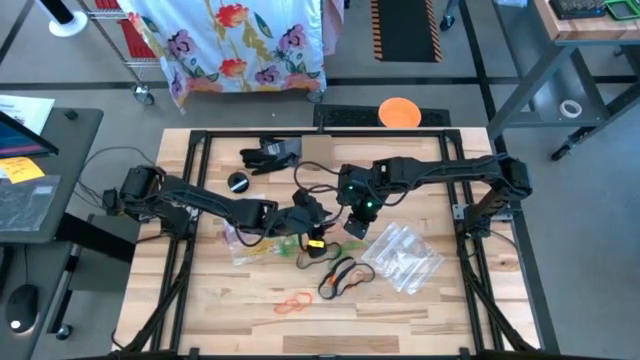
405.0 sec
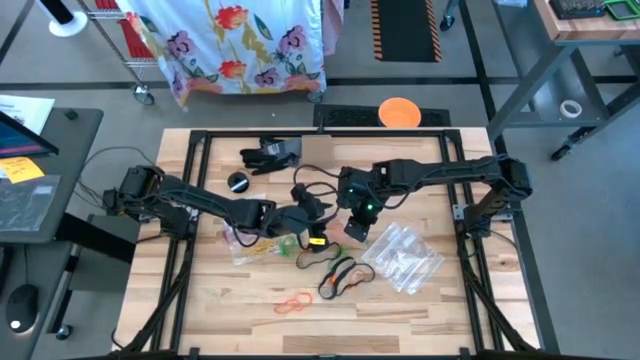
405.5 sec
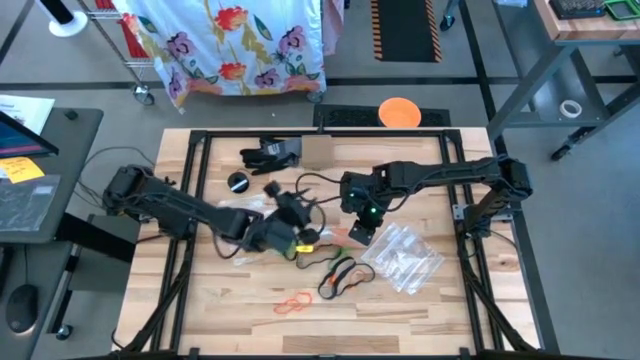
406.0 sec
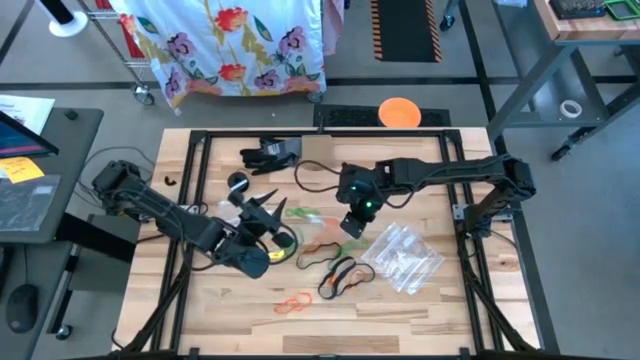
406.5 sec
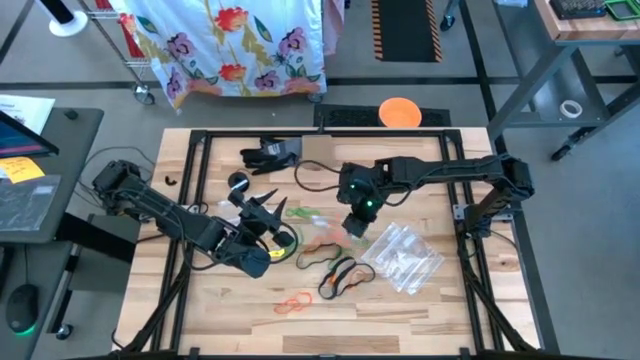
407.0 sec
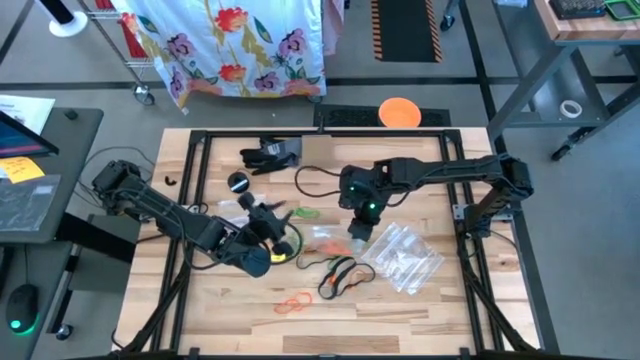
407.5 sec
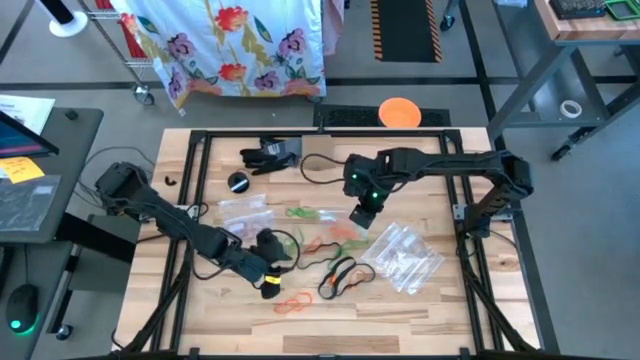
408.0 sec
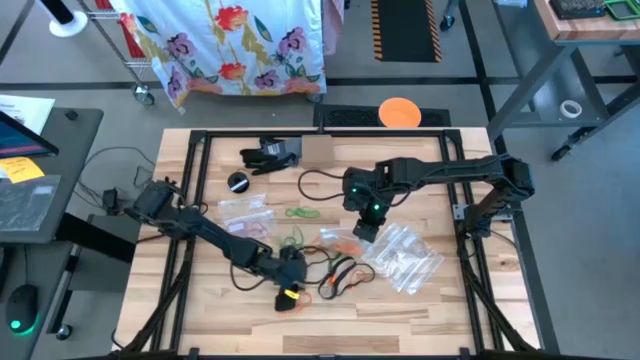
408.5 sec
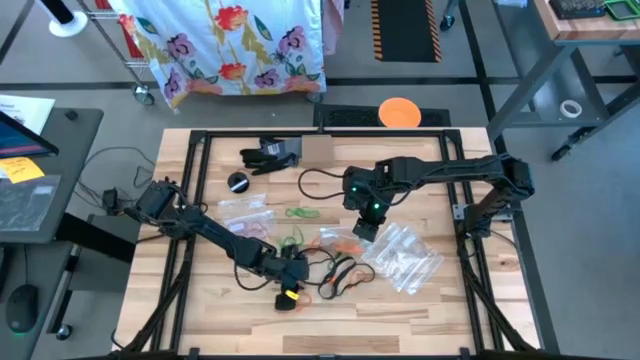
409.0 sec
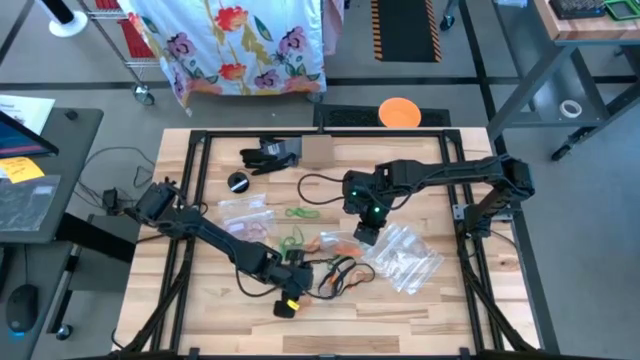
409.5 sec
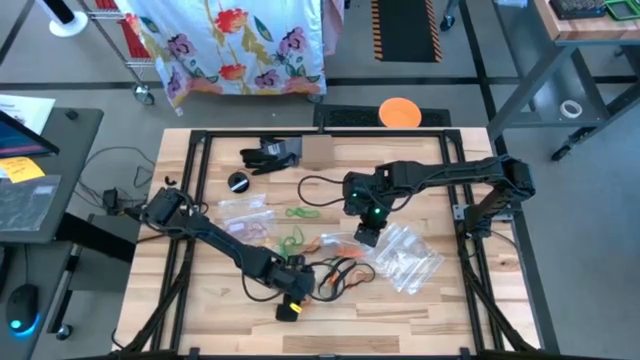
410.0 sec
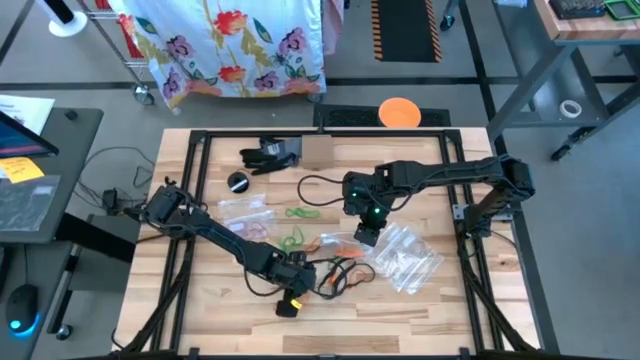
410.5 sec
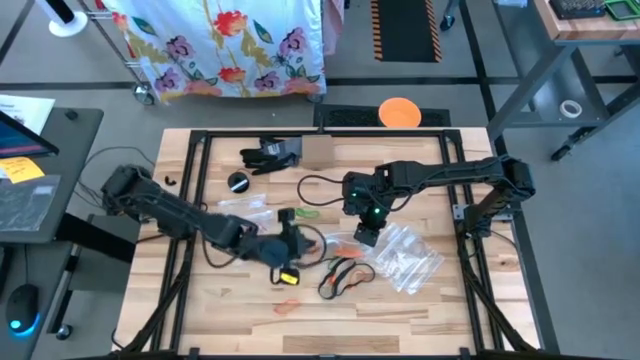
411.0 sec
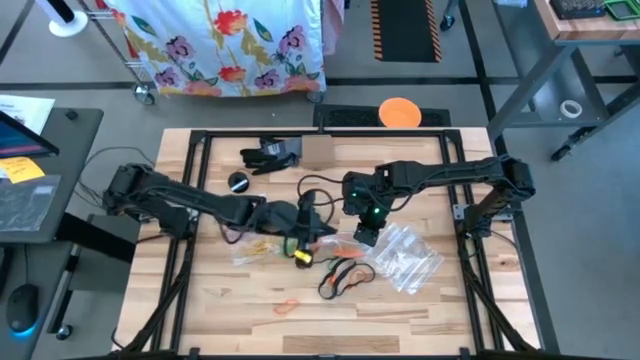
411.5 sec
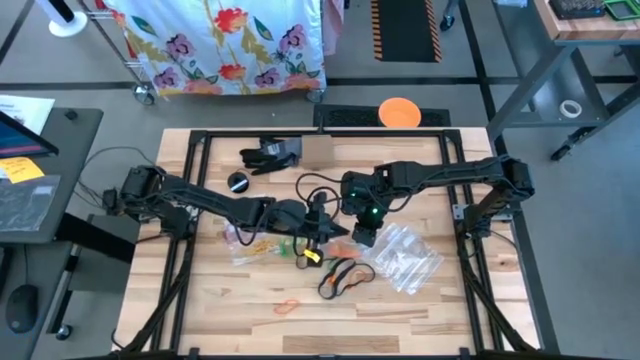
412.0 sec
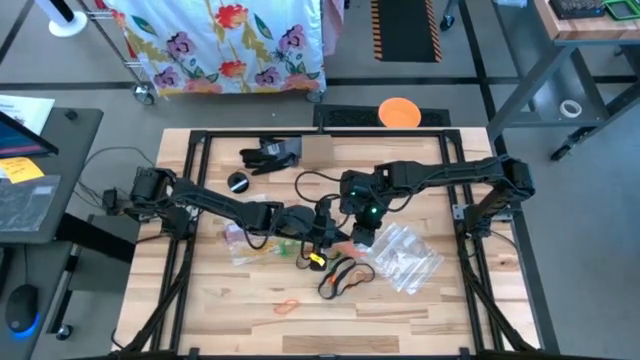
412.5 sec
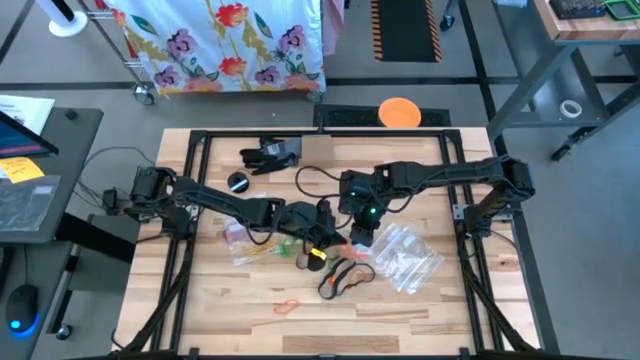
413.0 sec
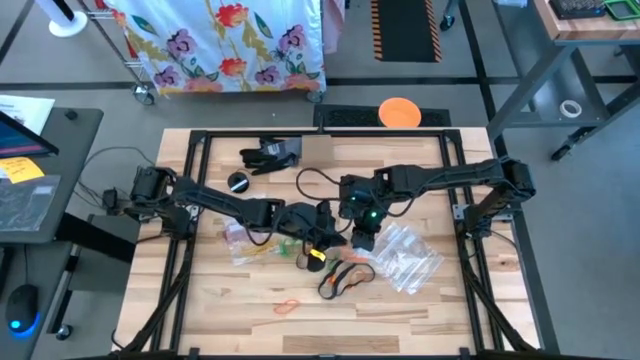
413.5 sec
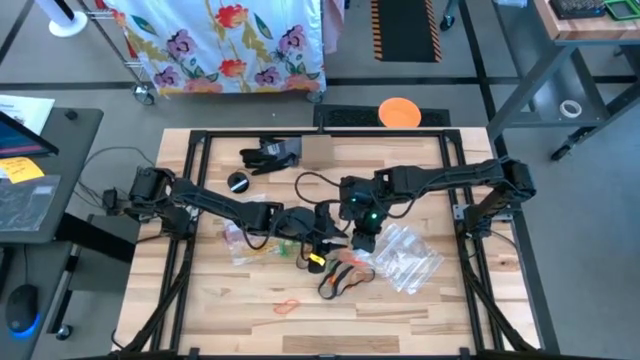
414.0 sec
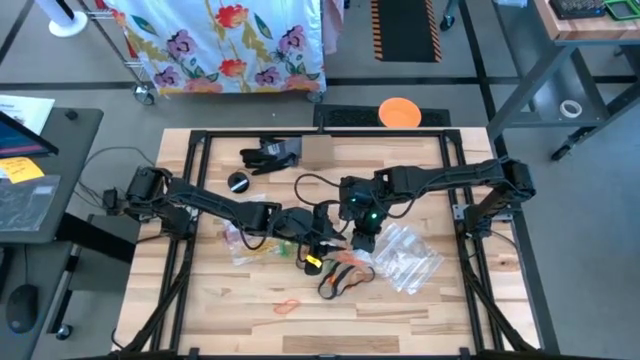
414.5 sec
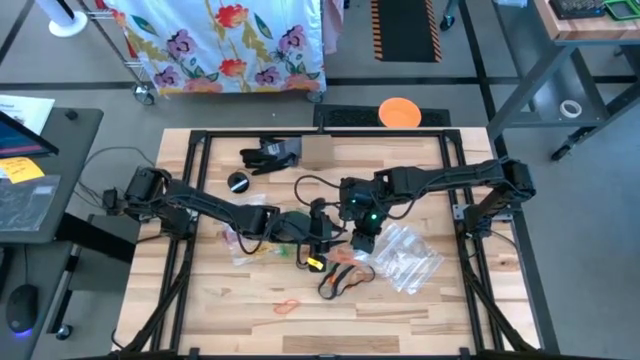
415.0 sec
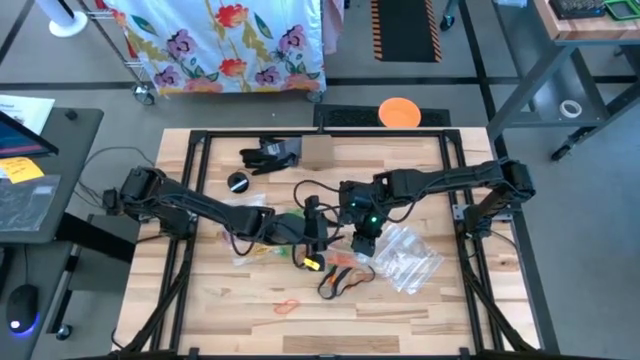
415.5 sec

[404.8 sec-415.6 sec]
Task: Sort rubber bands
Put the orange rubber band into the transparent zip bag

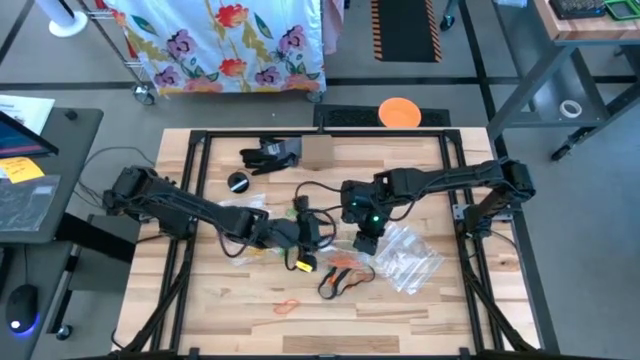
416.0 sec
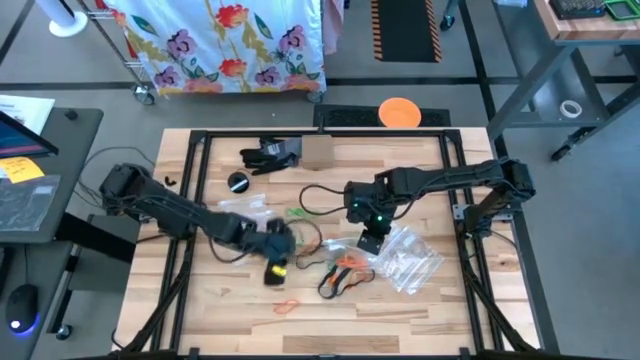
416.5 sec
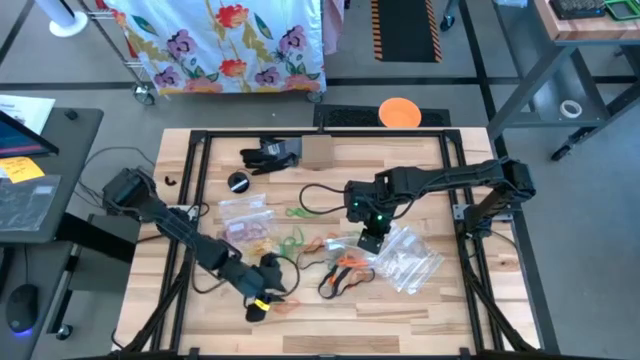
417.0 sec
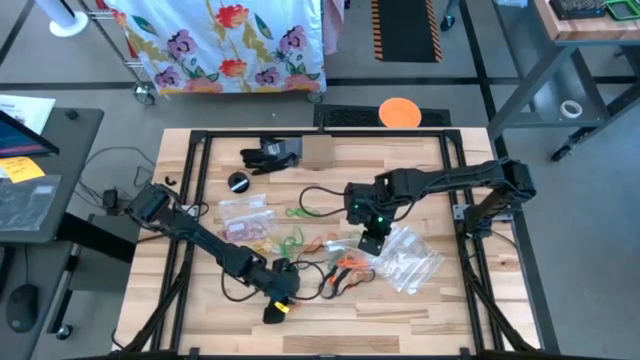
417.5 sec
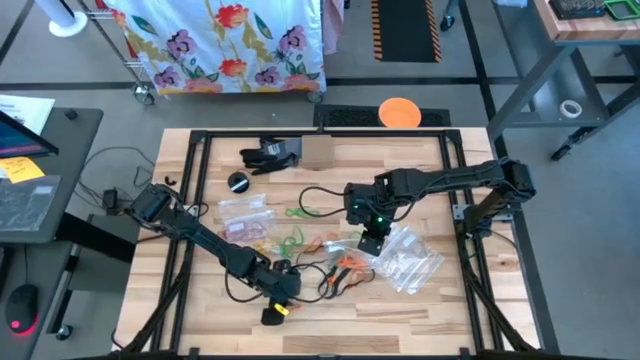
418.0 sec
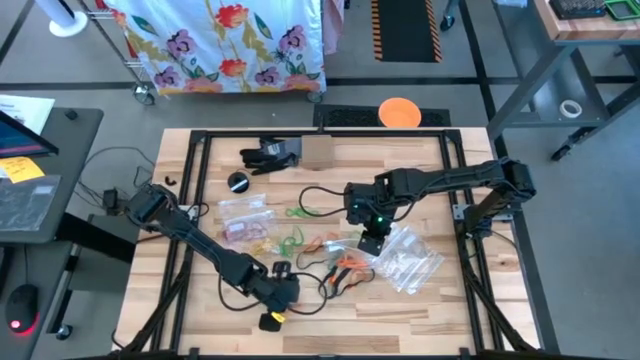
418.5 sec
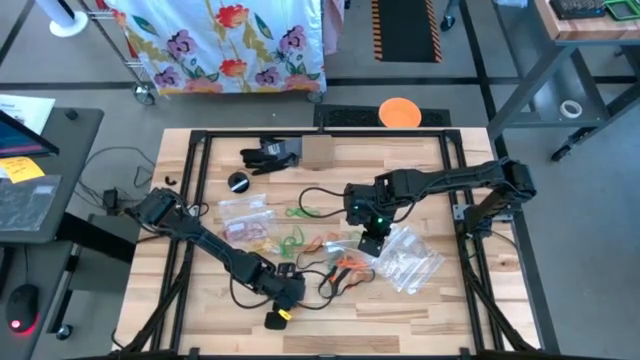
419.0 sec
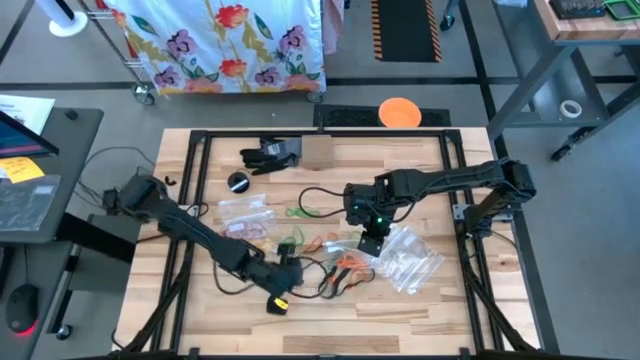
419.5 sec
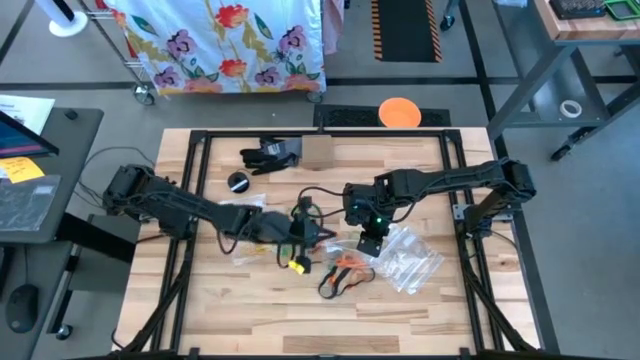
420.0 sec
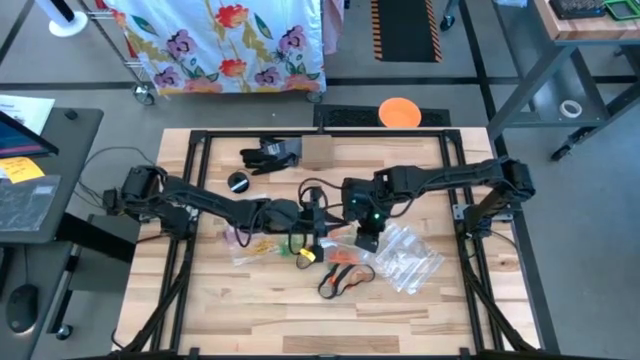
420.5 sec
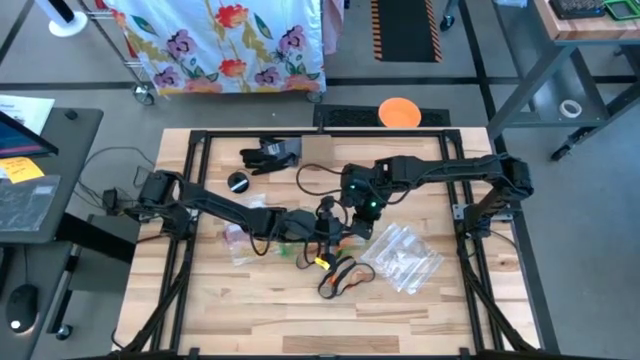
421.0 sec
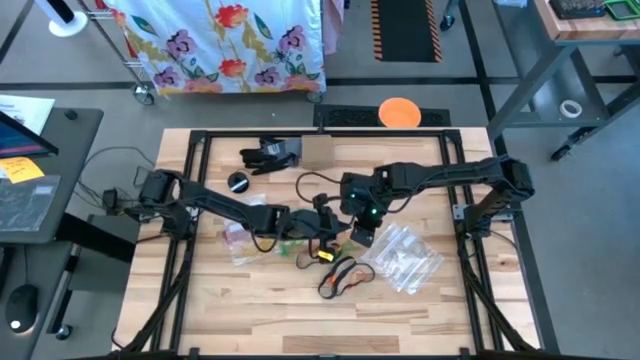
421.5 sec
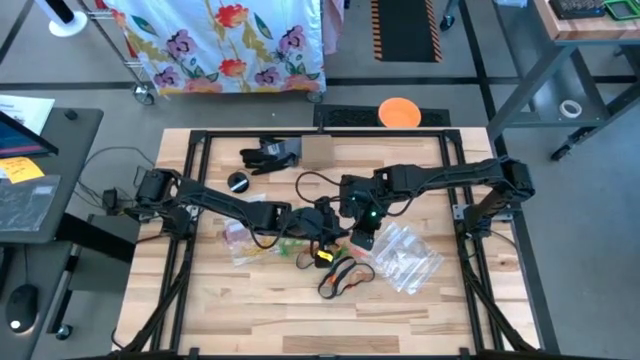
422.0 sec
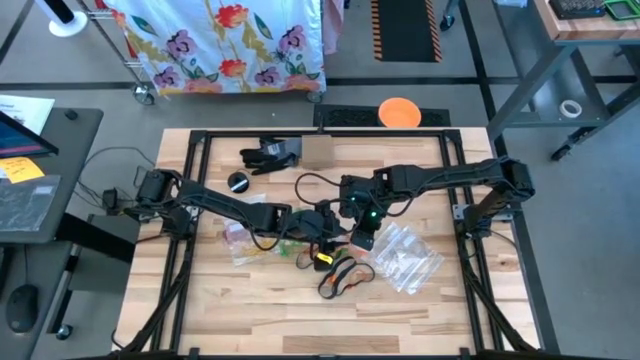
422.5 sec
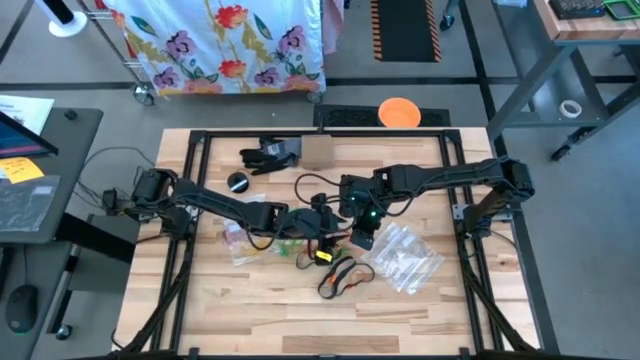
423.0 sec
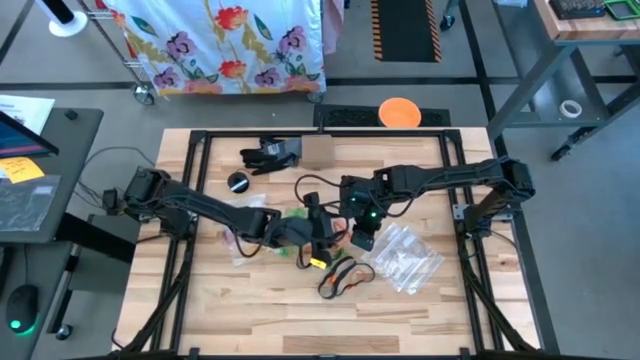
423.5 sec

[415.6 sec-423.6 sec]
Put the orange rubber band into the transparent zip bag

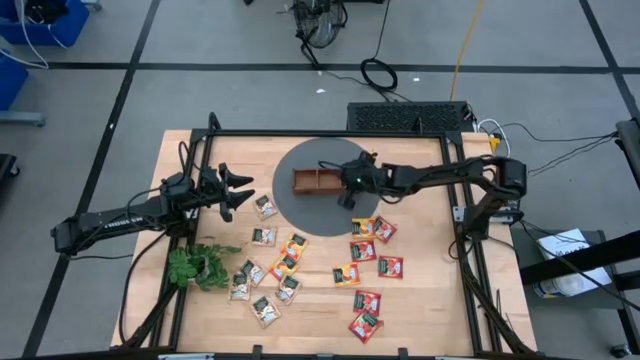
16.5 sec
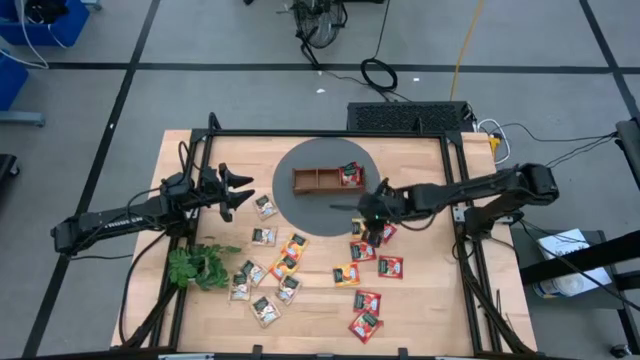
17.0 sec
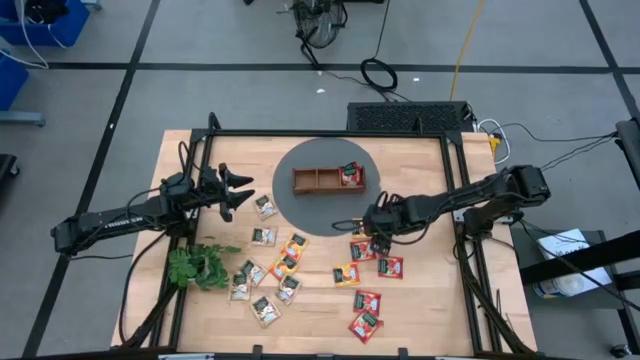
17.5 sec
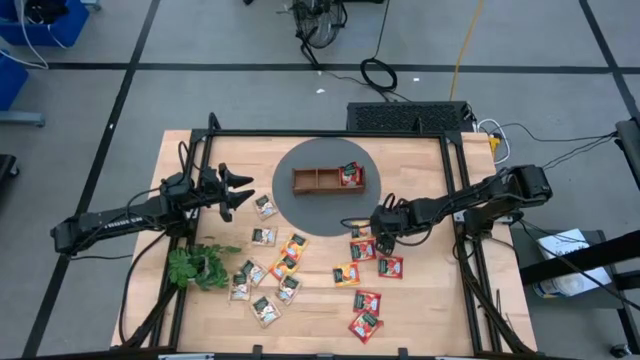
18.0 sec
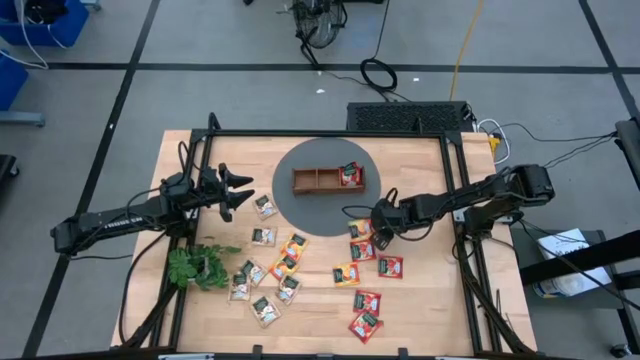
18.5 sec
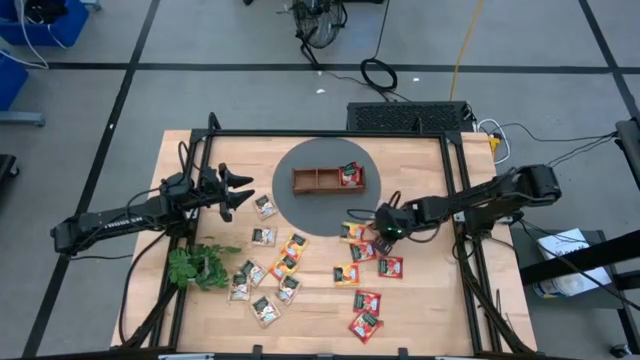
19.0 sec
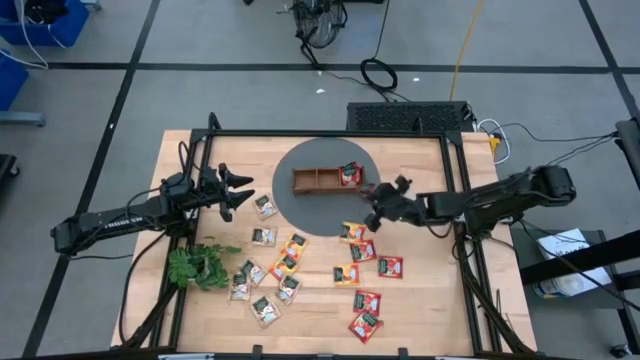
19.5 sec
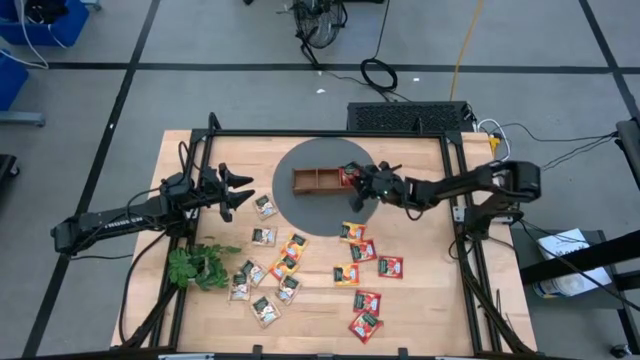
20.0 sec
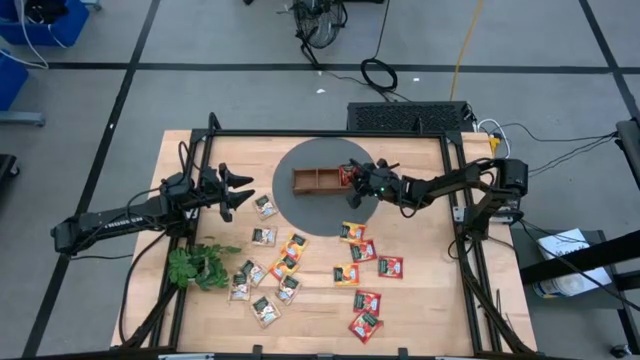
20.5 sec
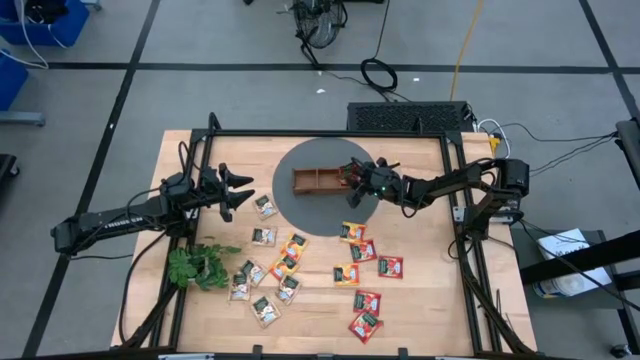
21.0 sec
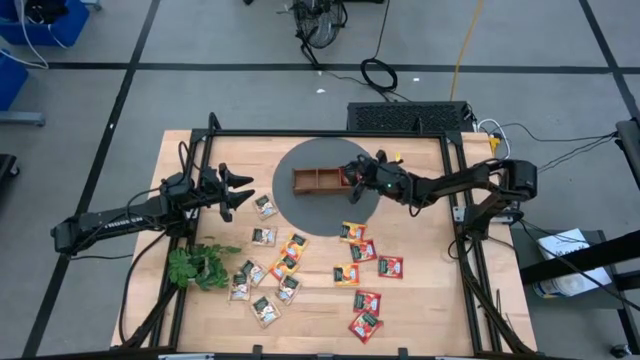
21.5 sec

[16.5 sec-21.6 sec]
Task: Pick & Place Tea
Put the red tea bag into the right section of the wooden organizer
